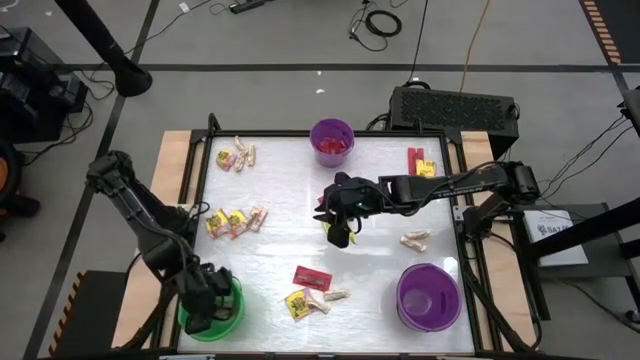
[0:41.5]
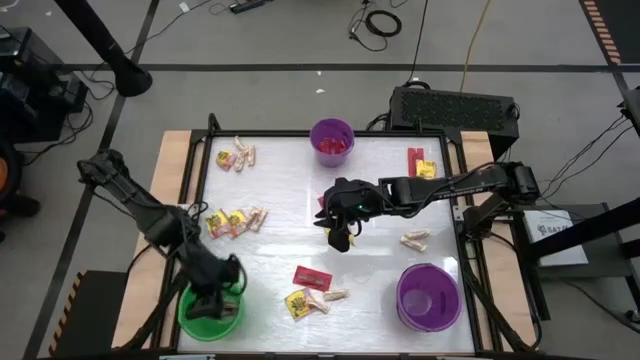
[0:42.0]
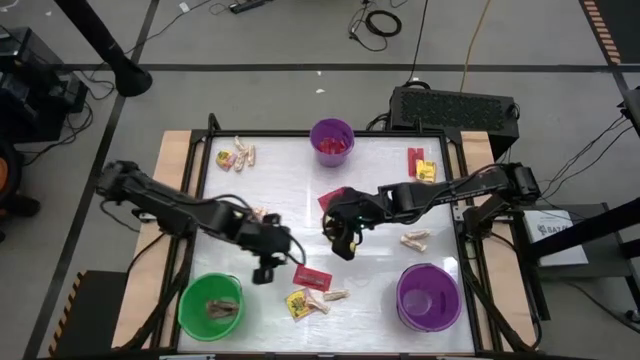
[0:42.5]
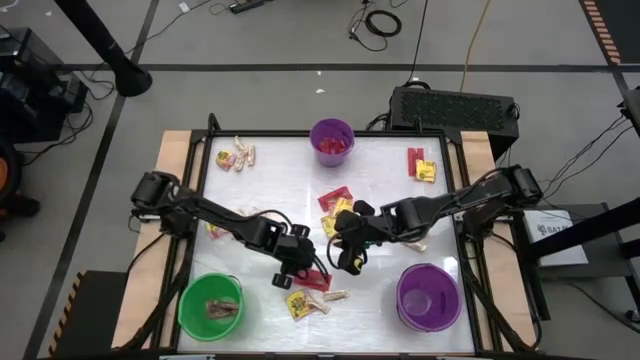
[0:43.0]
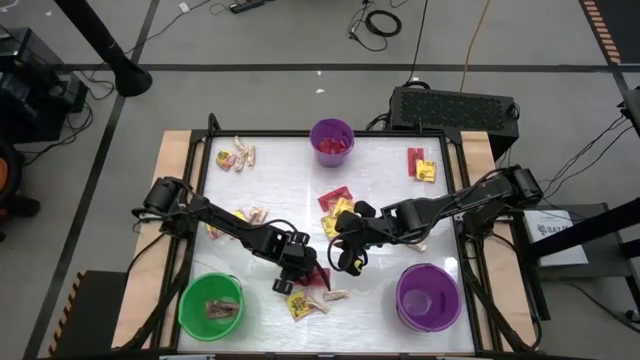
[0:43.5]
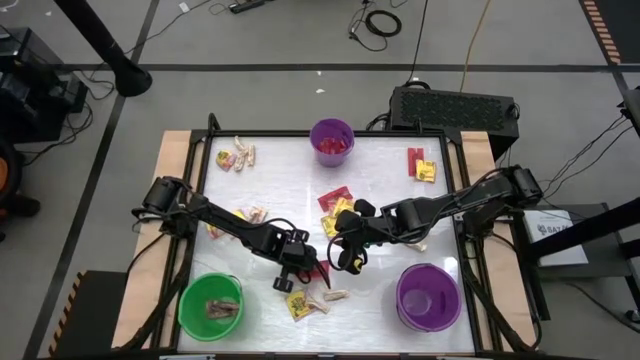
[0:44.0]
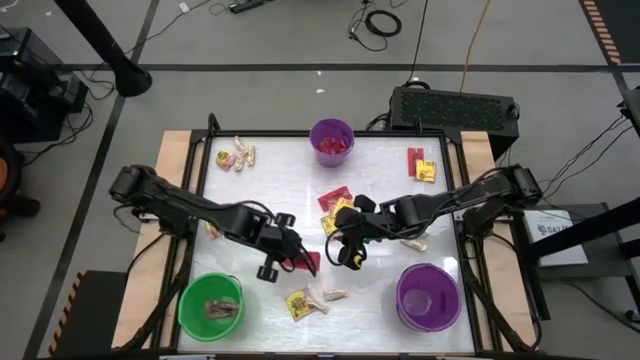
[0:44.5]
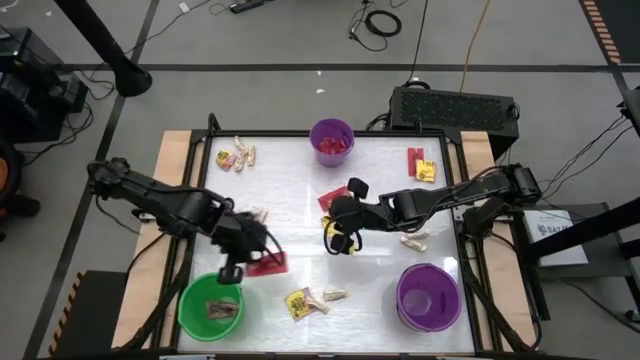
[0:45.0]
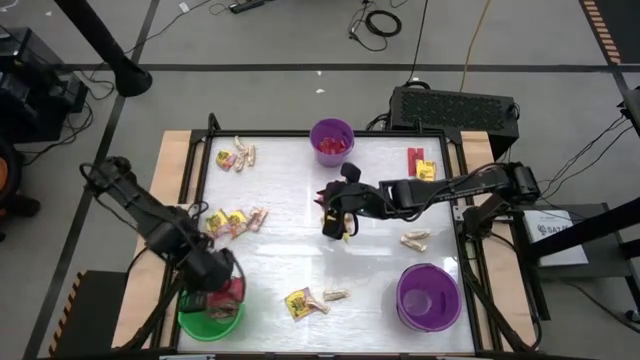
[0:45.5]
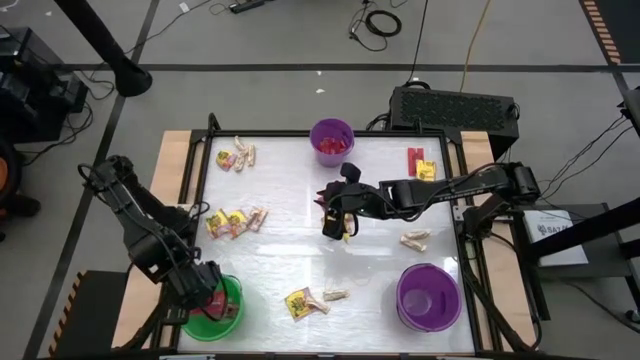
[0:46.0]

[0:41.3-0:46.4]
Task: Sort candy by brand, put in halloween buckets
Put the red candy into the green bucket

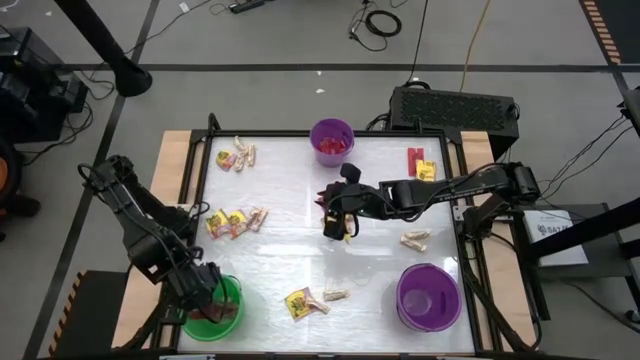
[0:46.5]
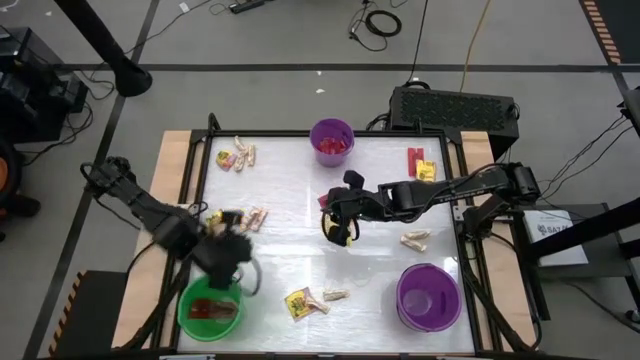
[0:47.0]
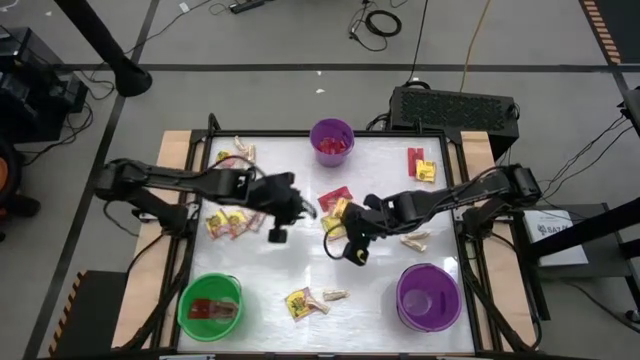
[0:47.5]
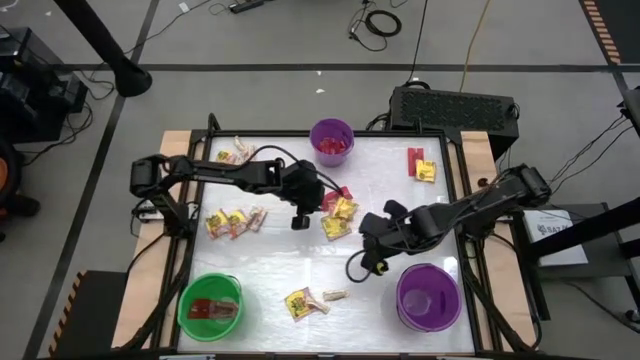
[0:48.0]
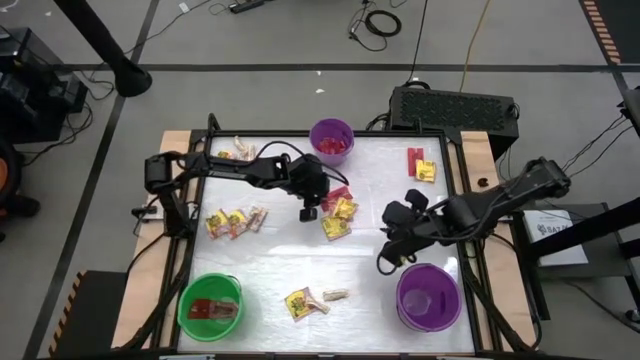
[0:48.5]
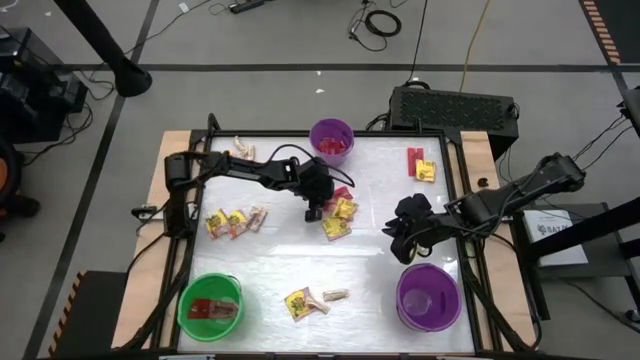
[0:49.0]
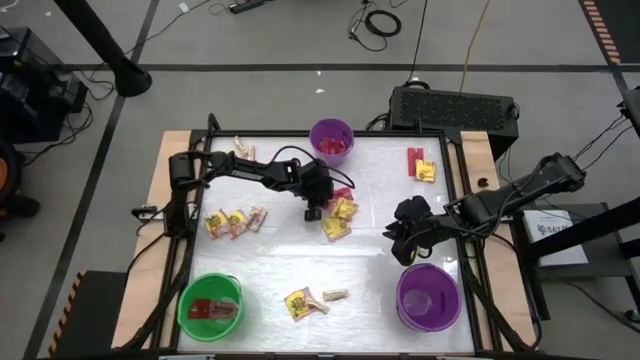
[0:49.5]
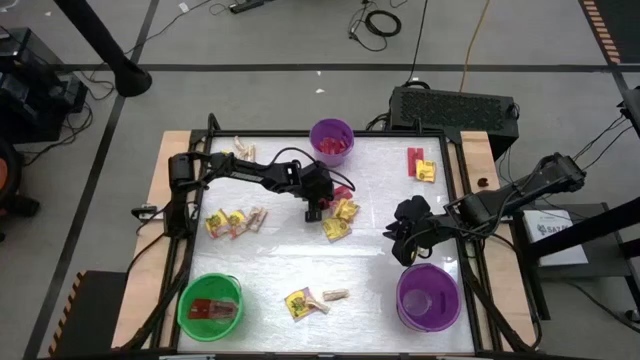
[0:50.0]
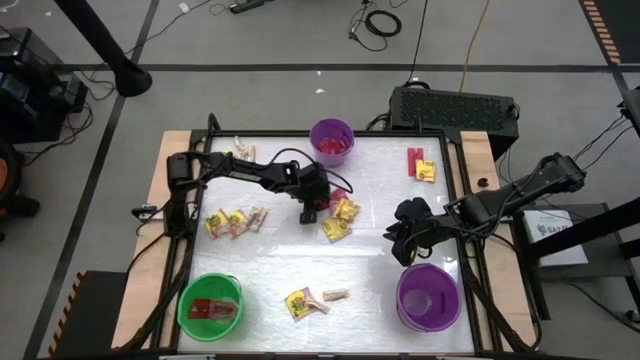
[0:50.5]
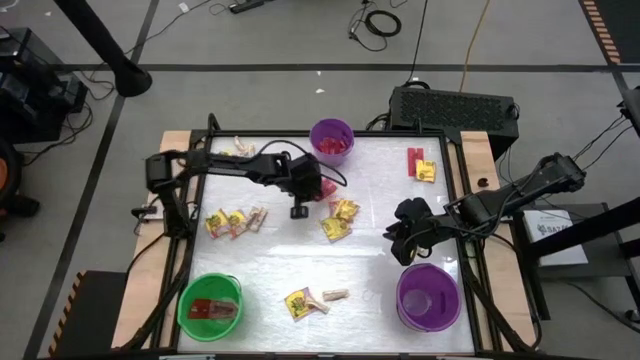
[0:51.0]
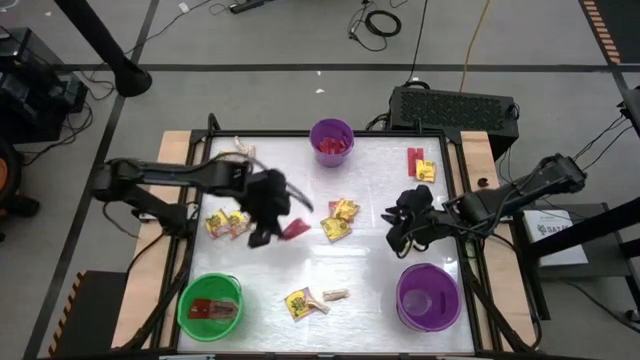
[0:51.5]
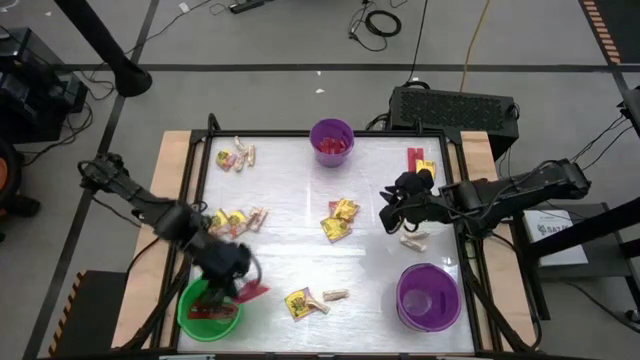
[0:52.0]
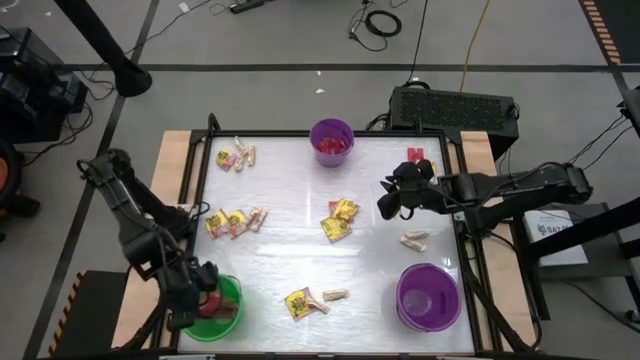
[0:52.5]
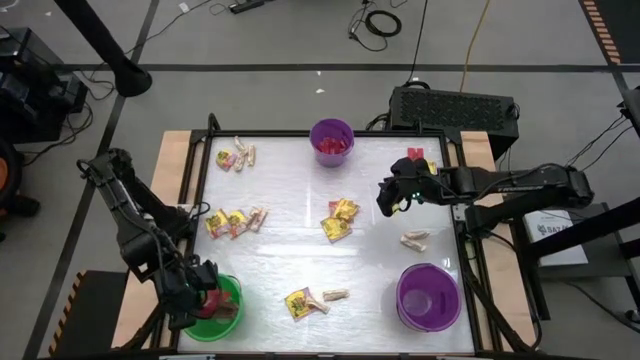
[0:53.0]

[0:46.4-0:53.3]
Put the red candy into the green bucket

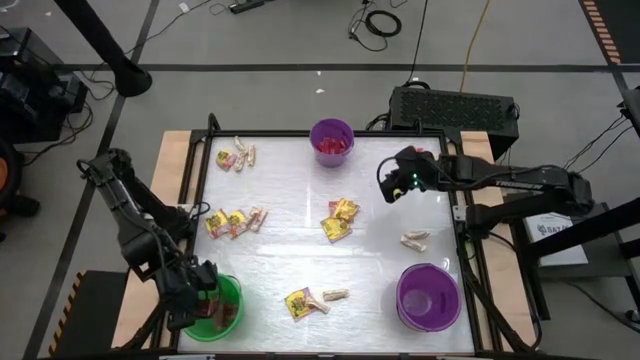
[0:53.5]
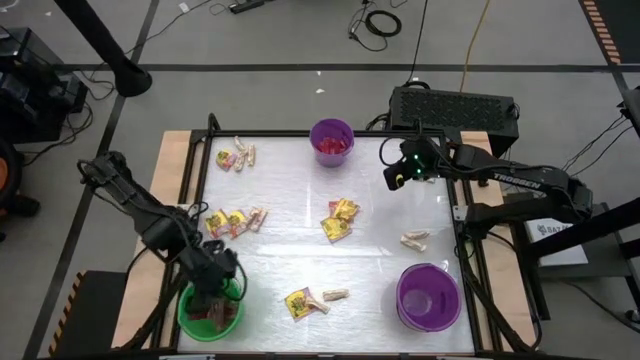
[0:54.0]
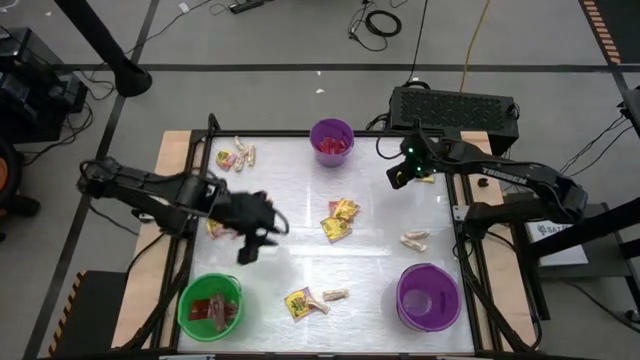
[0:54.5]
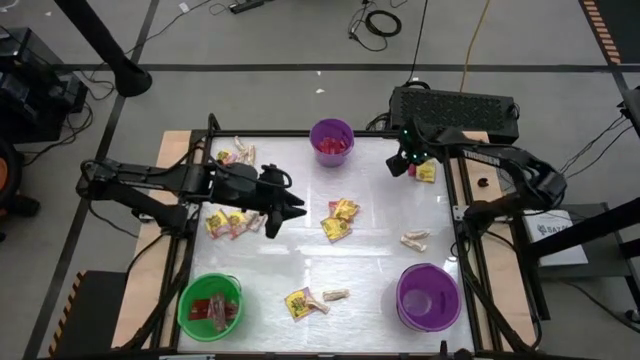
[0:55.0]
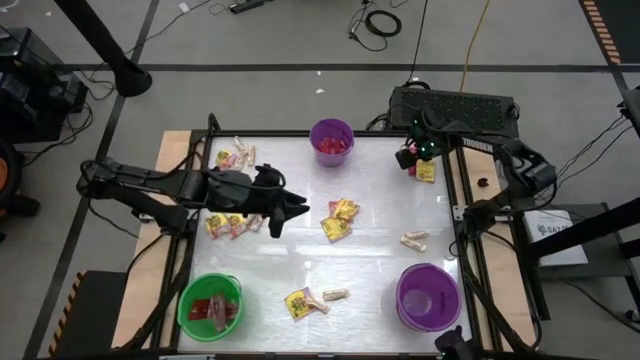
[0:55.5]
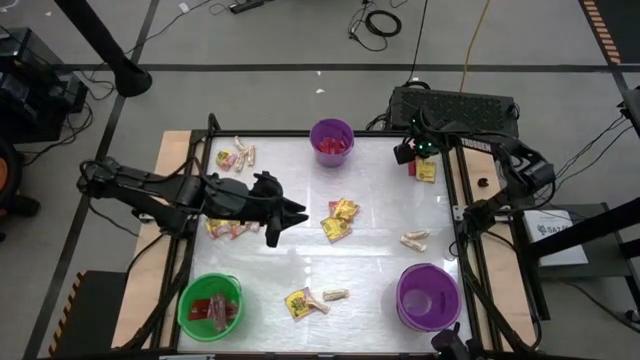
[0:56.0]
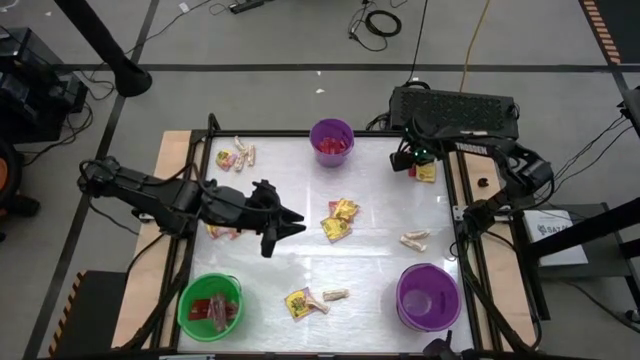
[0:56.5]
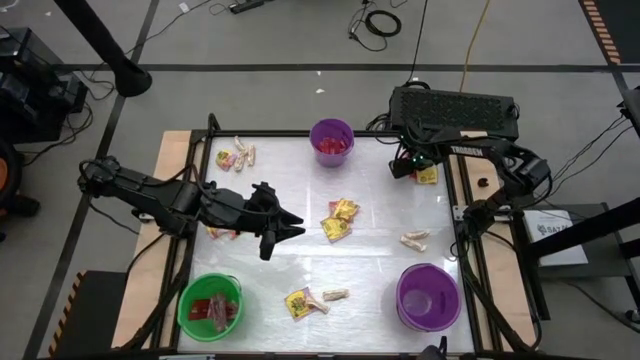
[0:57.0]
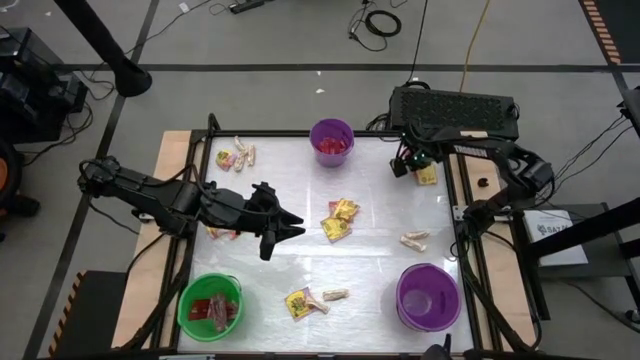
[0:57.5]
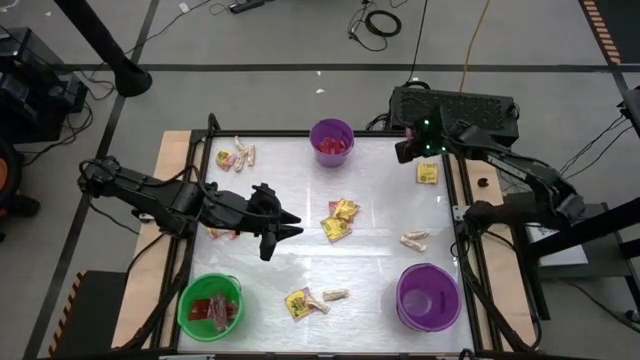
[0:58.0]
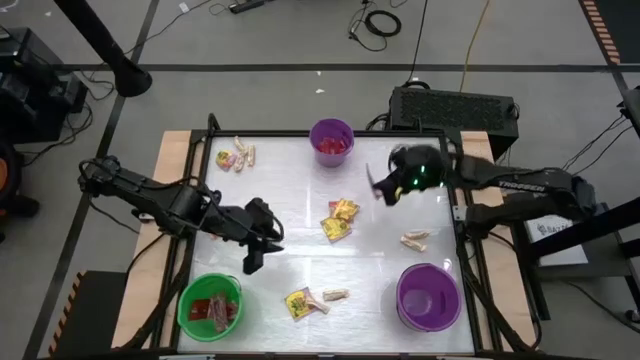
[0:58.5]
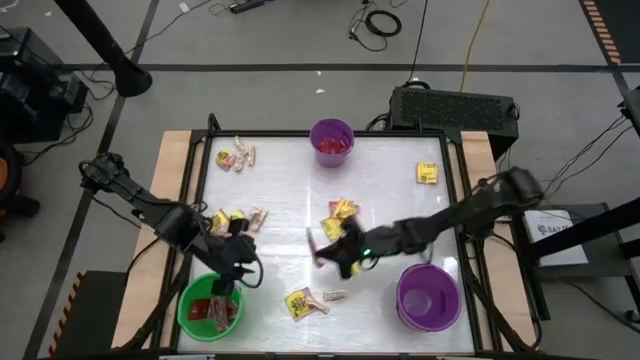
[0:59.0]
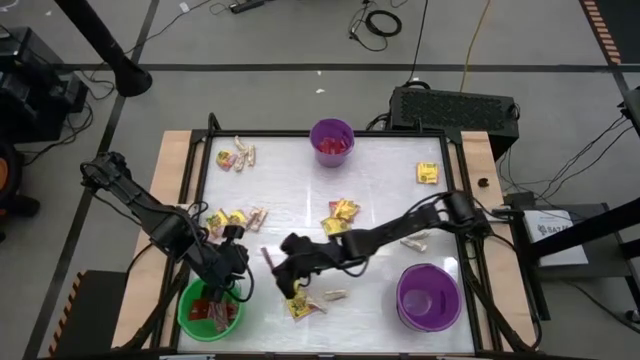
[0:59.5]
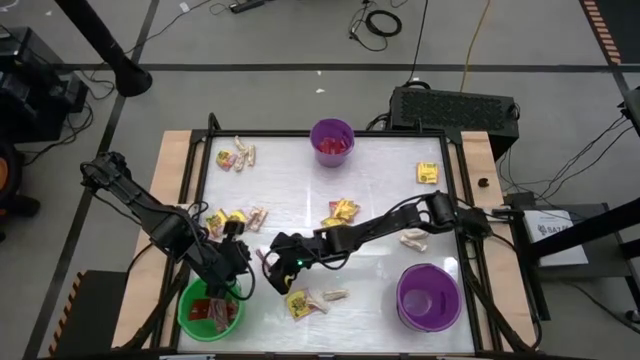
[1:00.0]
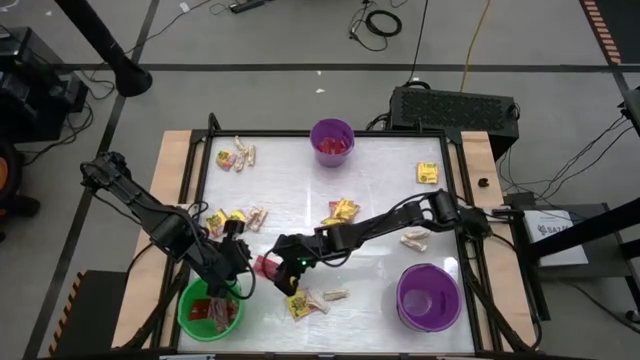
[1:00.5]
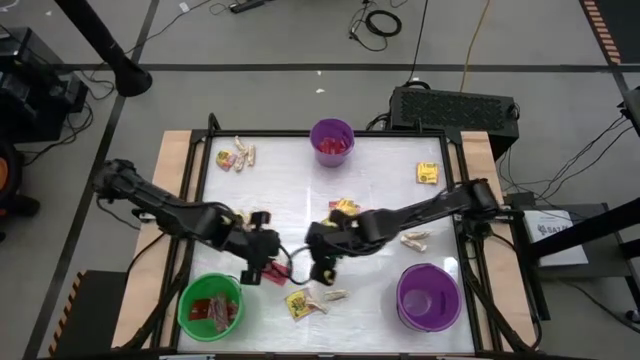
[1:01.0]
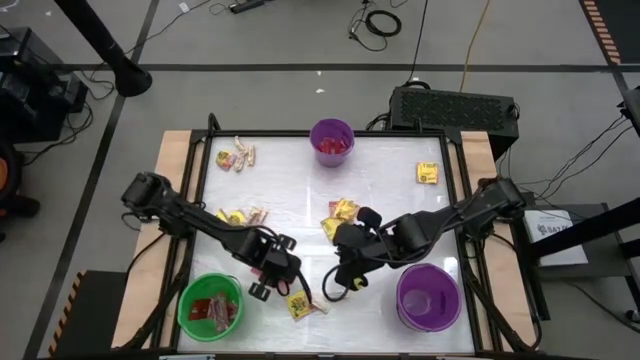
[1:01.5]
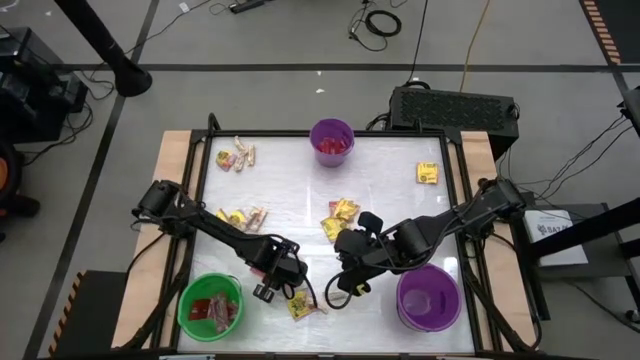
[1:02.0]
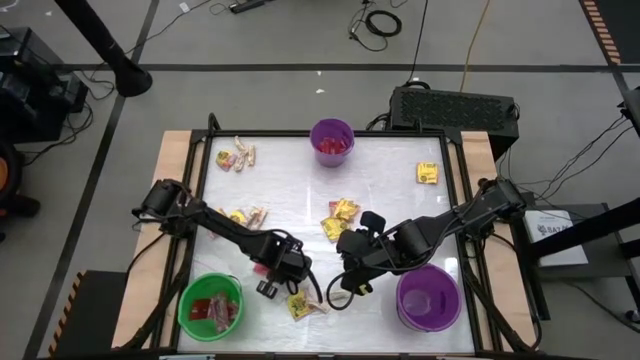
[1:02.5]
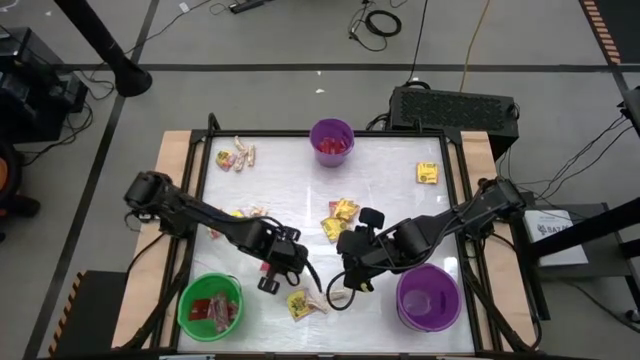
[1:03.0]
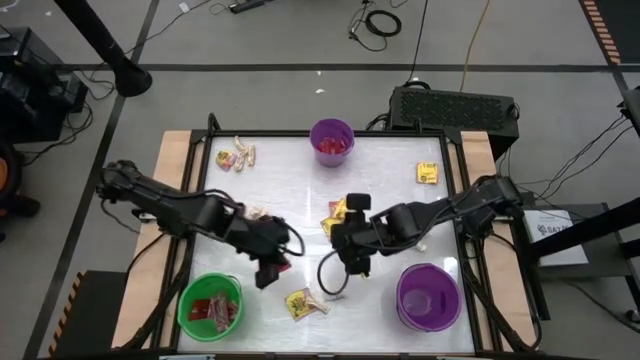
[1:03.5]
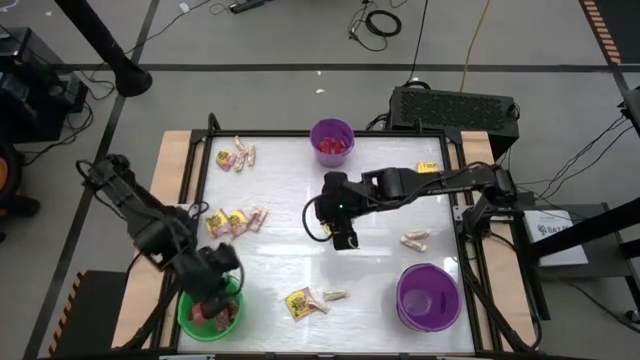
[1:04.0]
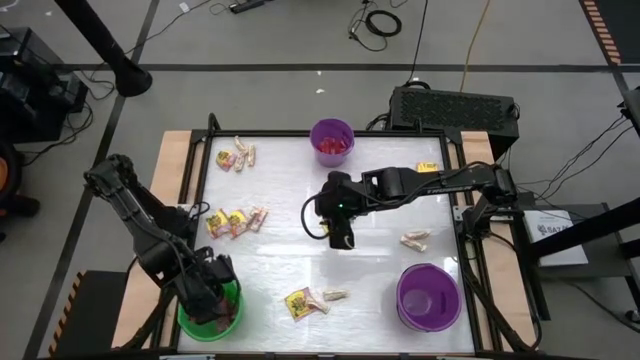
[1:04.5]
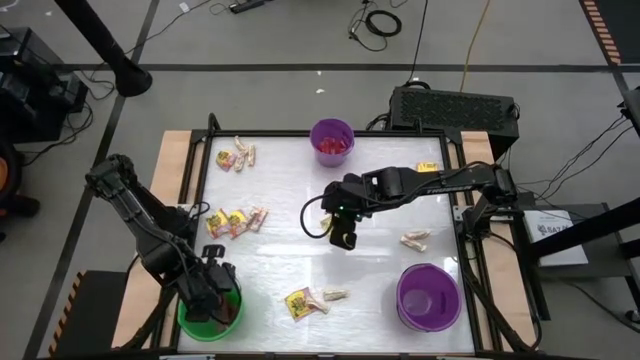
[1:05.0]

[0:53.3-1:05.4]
Put the red candy into the green bucket
